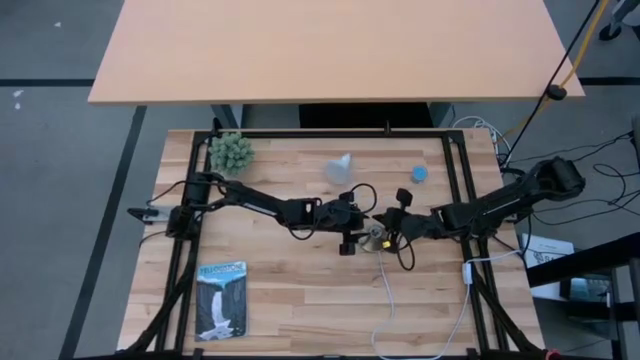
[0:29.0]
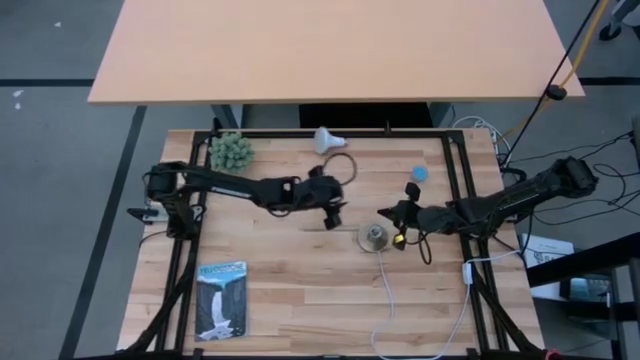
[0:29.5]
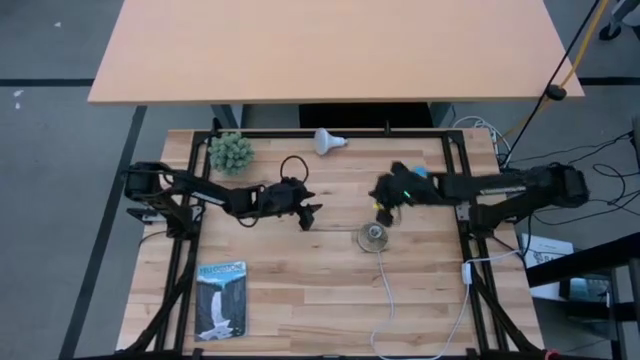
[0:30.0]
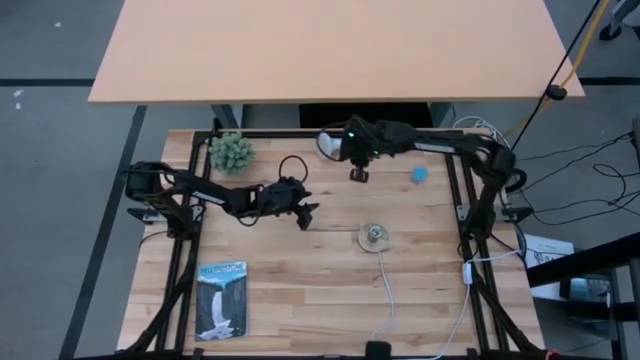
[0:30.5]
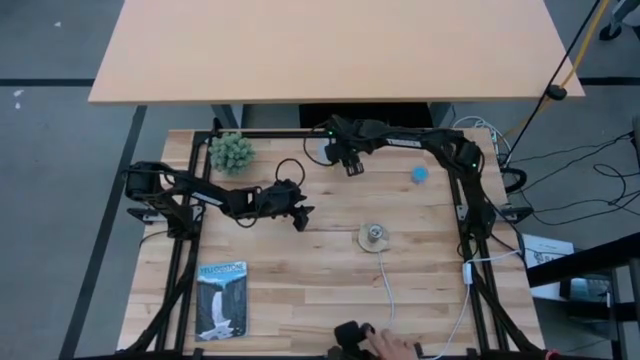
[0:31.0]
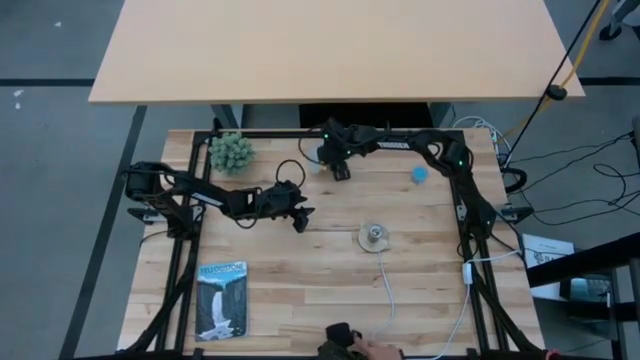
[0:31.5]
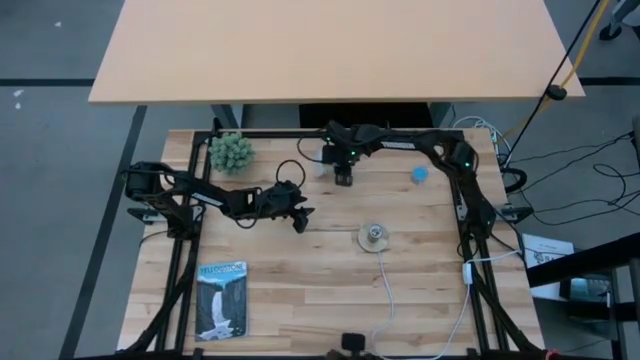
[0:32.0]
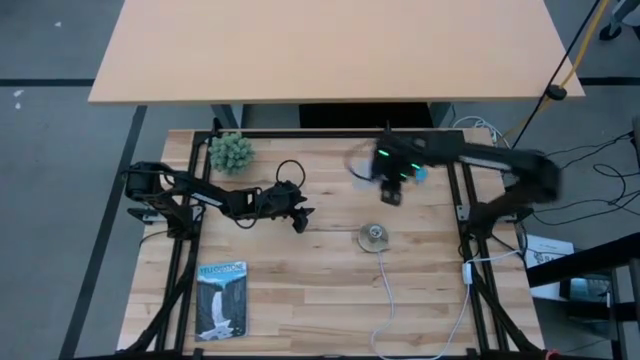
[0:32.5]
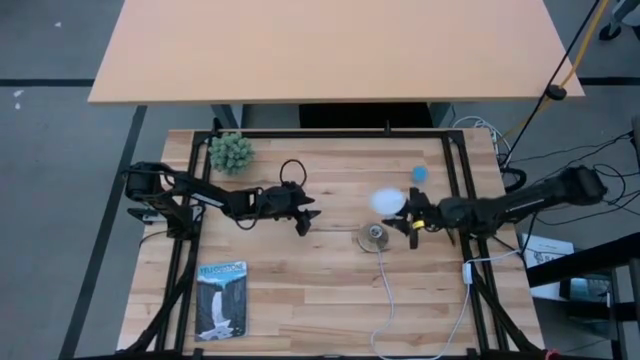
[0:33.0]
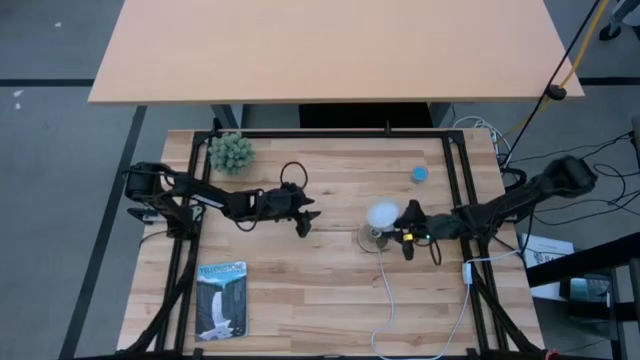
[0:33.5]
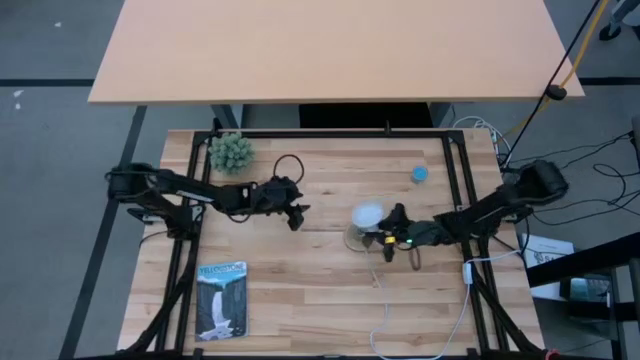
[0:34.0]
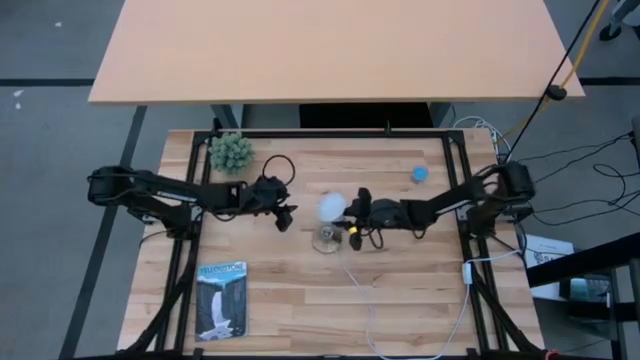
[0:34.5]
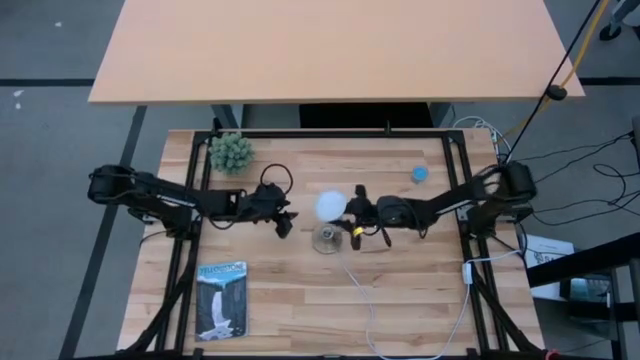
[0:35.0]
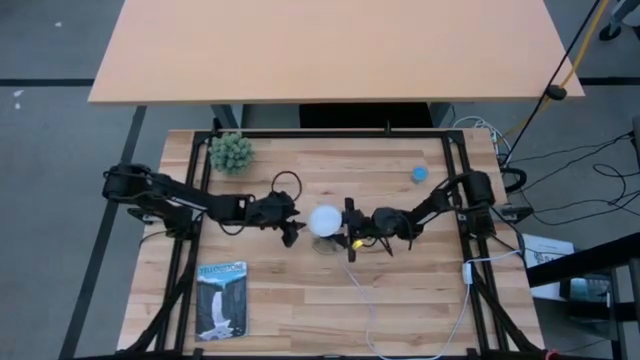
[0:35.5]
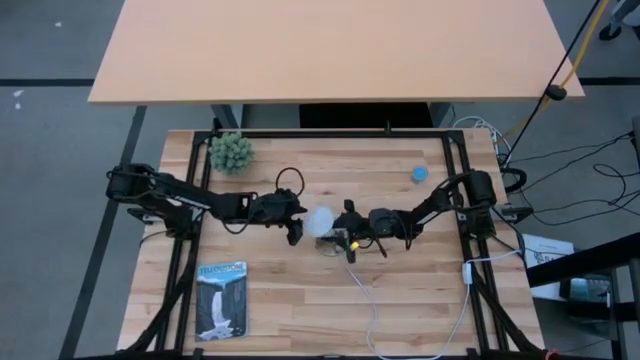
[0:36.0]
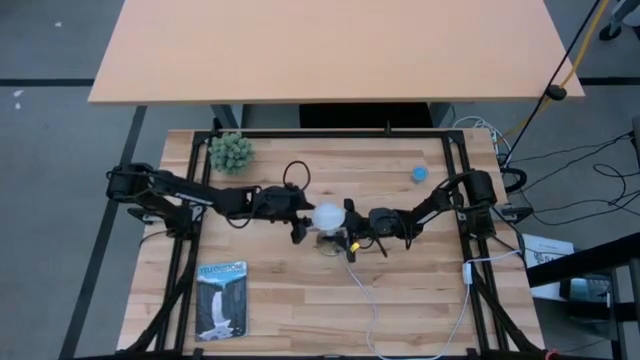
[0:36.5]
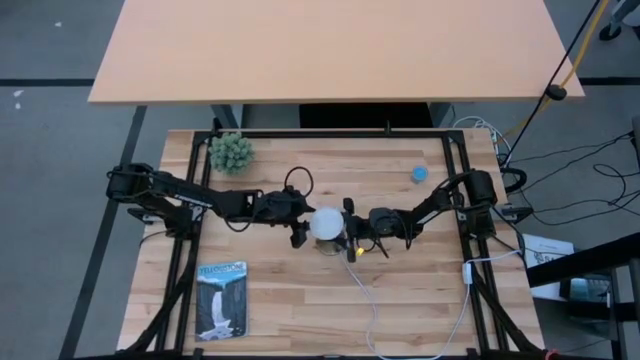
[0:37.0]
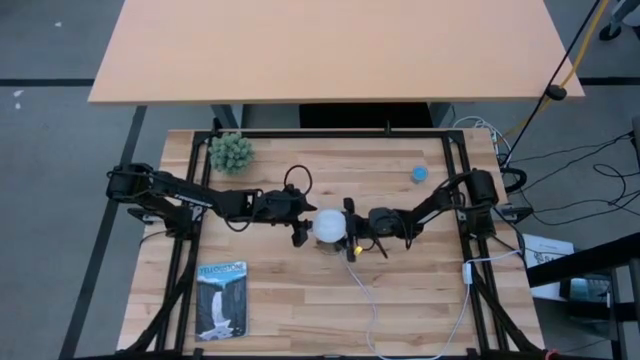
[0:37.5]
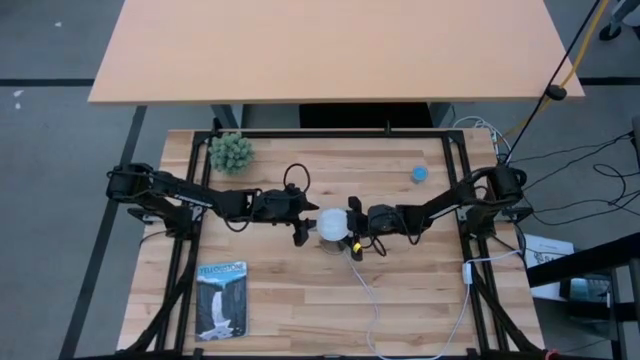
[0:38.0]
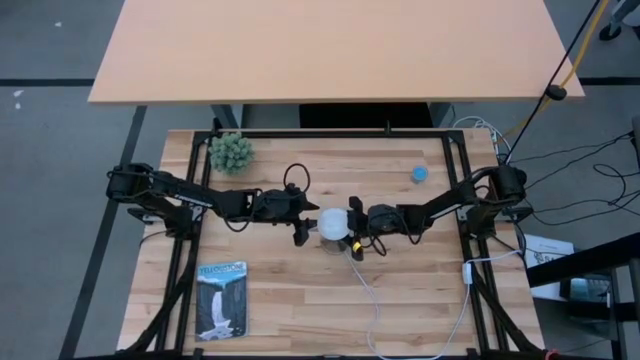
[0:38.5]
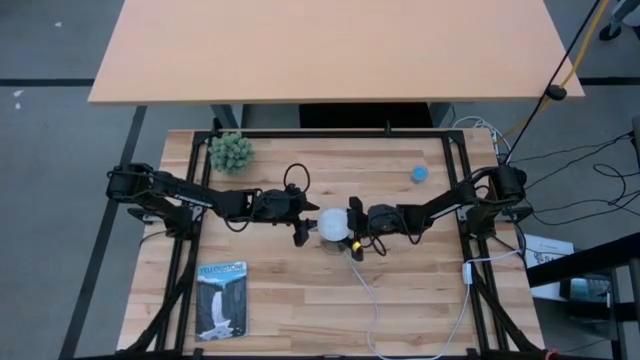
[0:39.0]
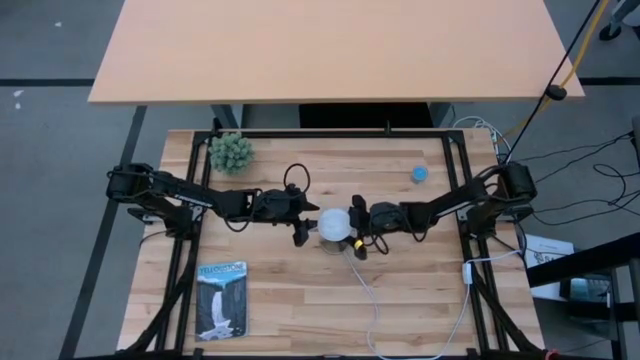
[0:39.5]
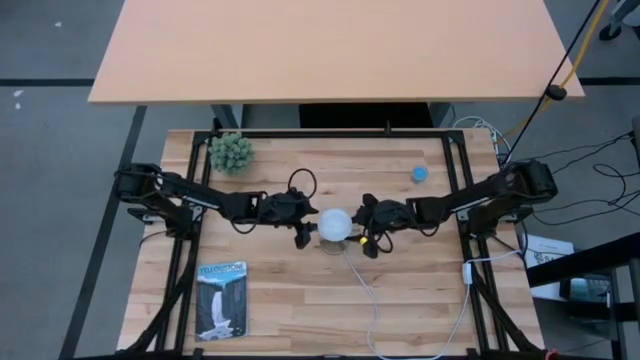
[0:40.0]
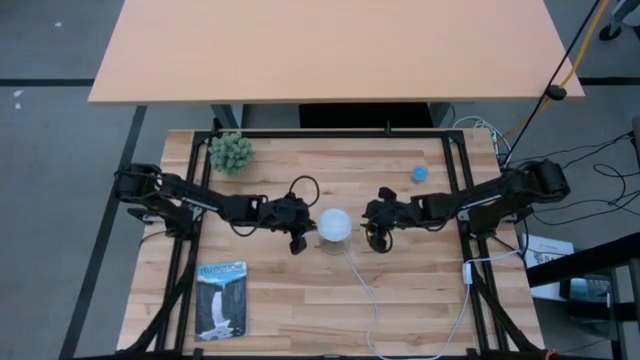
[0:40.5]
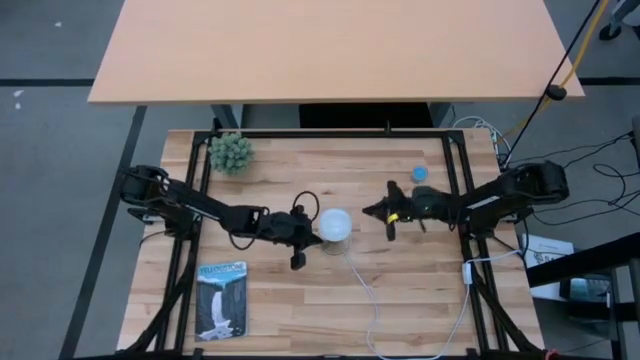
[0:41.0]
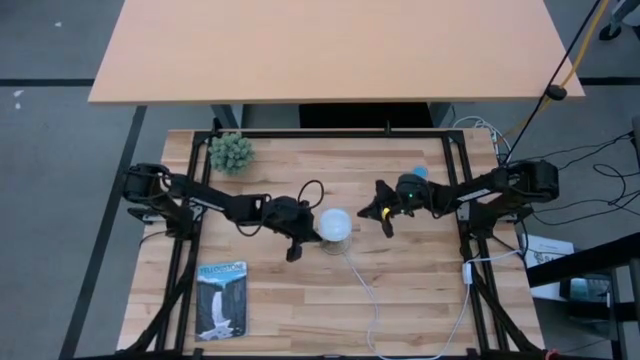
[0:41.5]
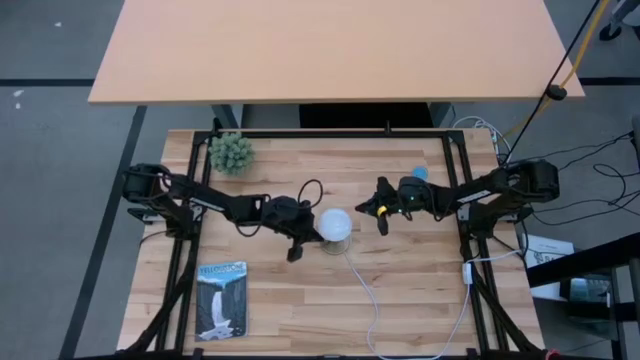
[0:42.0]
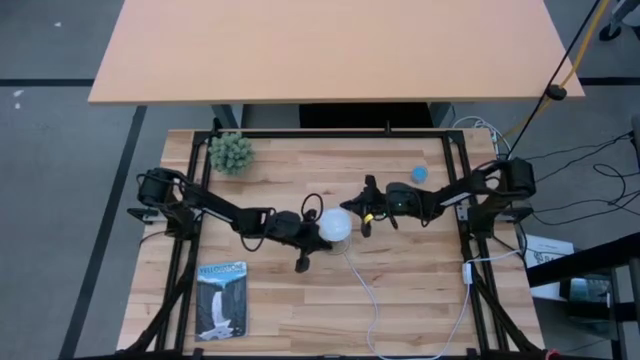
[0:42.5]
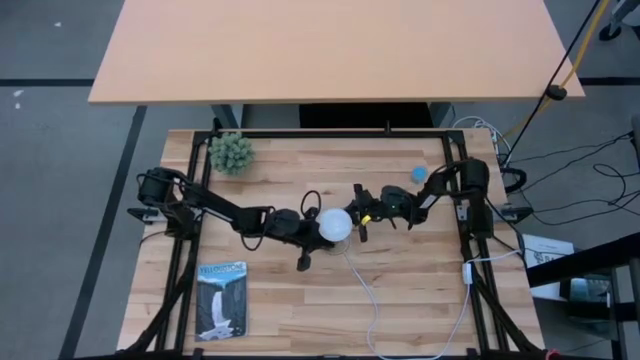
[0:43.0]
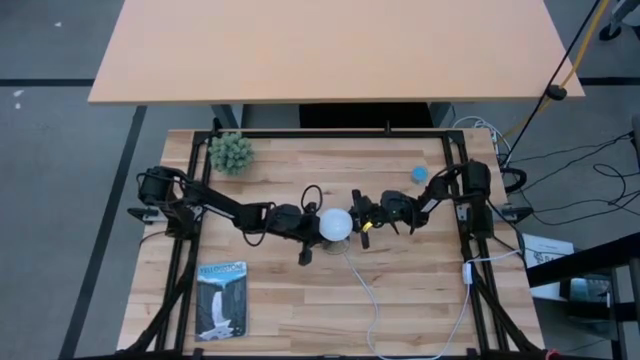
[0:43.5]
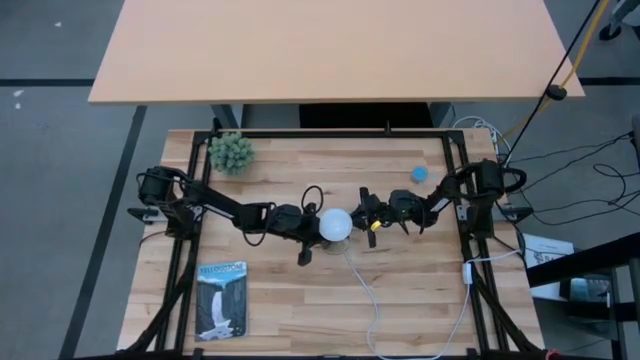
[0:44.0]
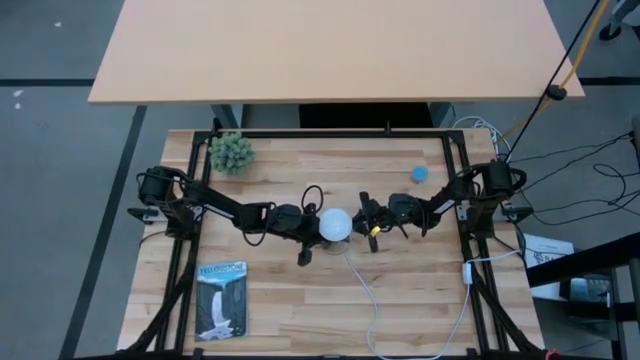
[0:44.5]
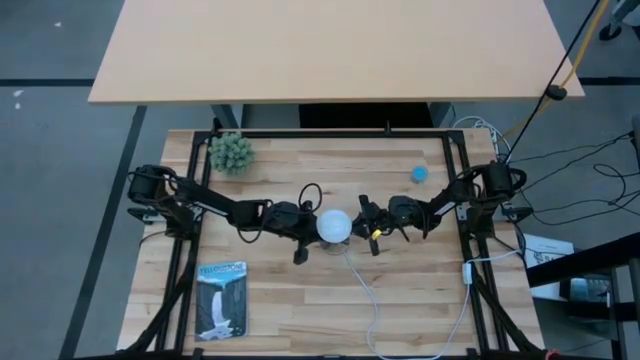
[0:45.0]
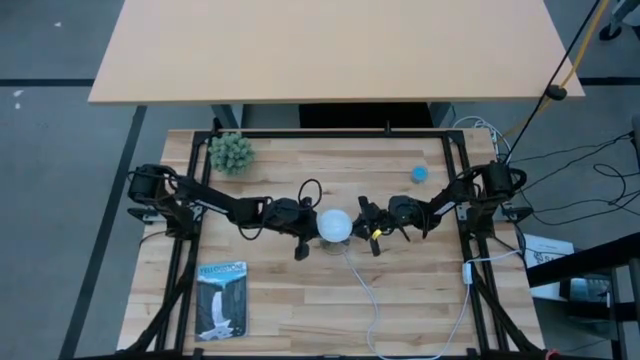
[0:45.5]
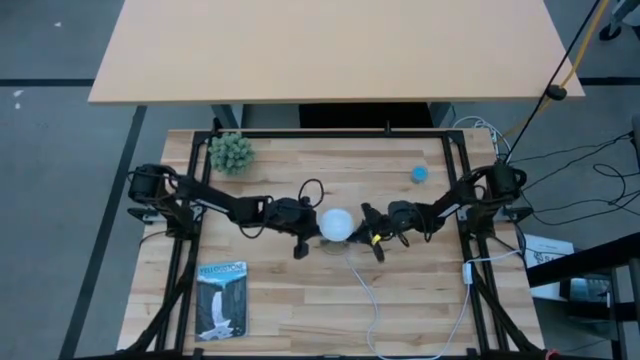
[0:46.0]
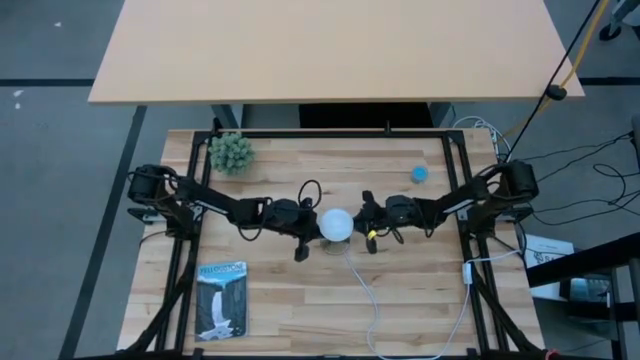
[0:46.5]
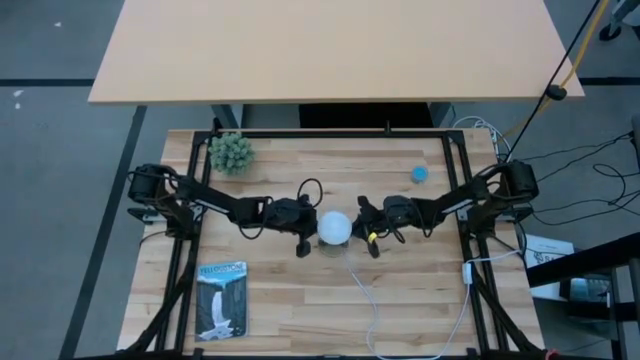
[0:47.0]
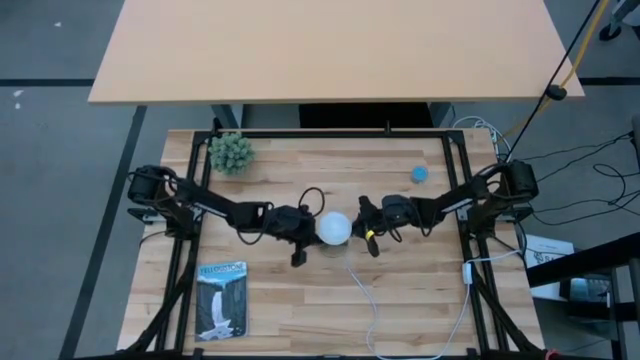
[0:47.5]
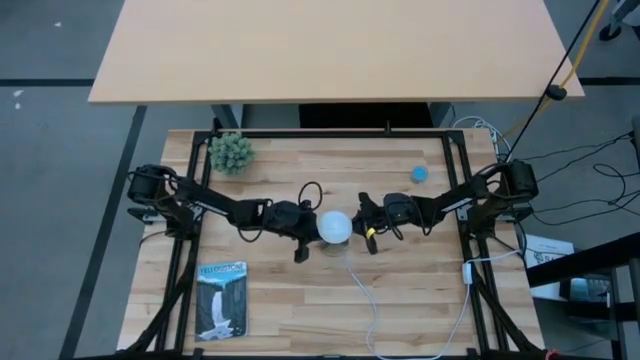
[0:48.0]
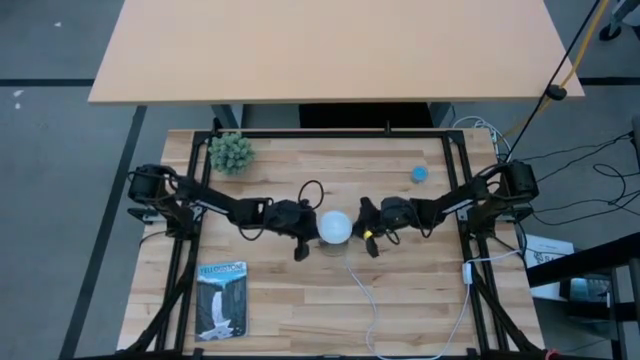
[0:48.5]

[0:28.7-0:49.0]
Task: Screw lightbulb
Insert the white lightbulb into the lamp

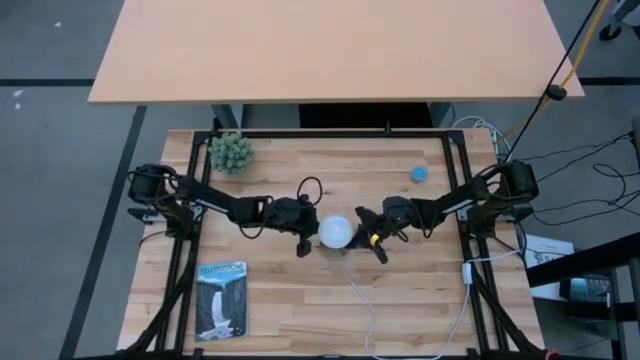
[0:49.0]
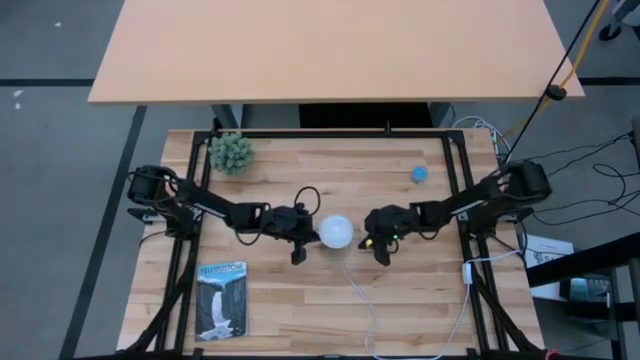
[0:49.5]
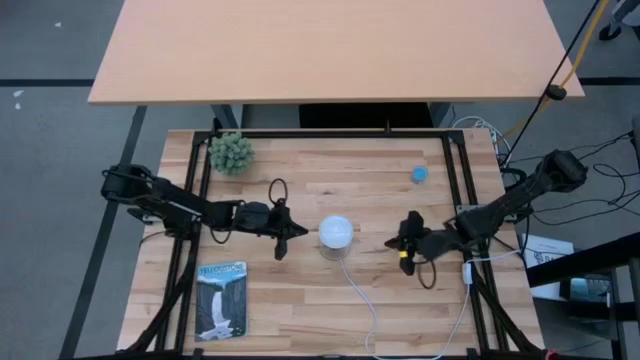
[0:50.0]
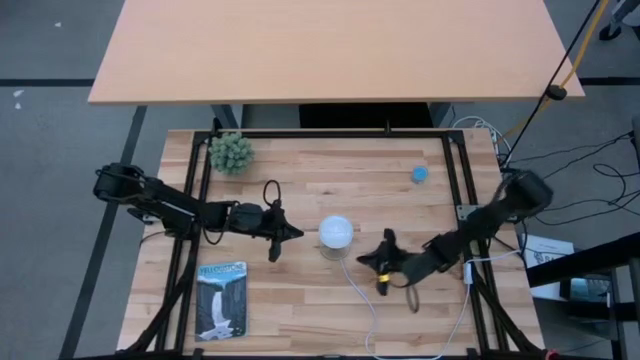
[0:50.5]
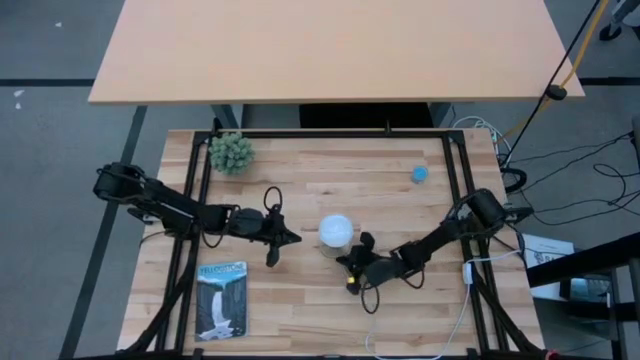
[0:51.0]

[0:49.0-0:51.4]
Adjust the lamp
